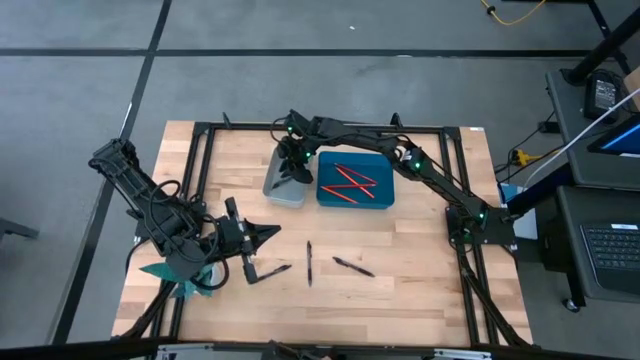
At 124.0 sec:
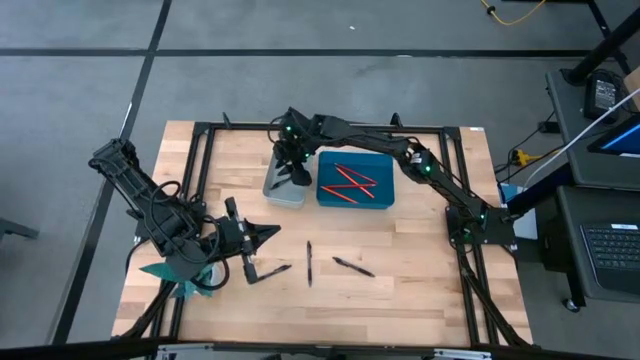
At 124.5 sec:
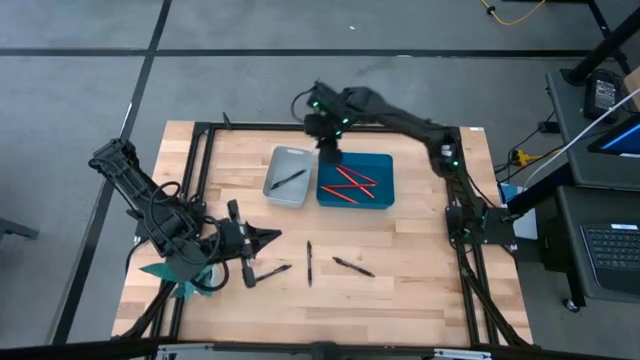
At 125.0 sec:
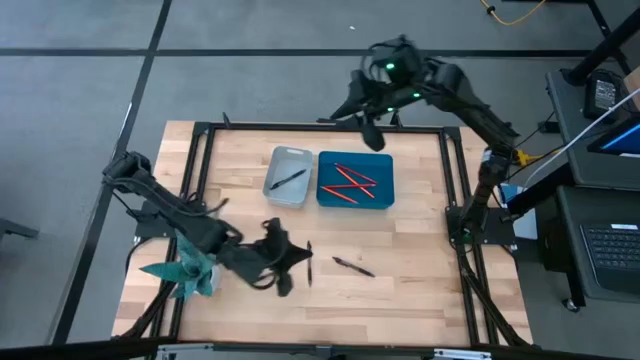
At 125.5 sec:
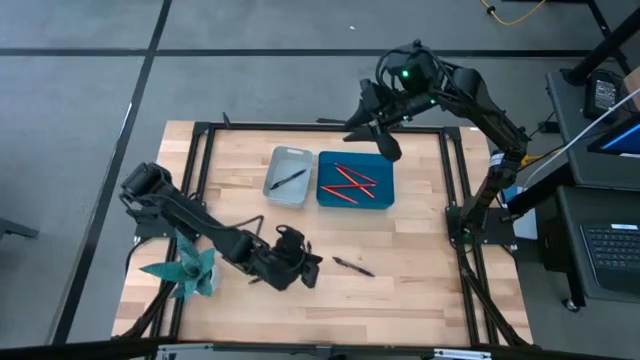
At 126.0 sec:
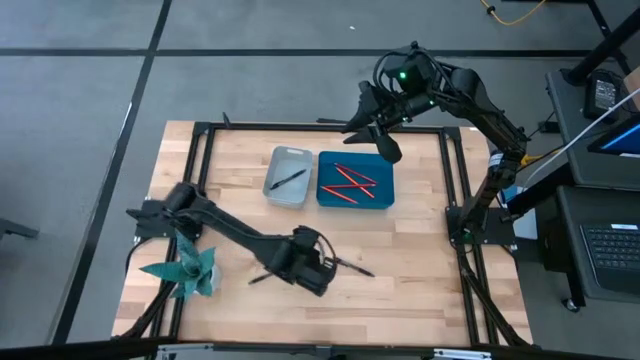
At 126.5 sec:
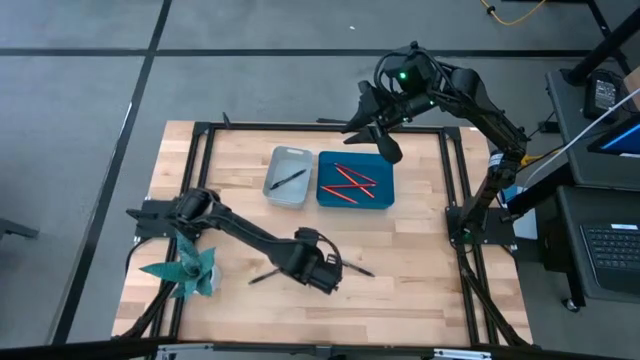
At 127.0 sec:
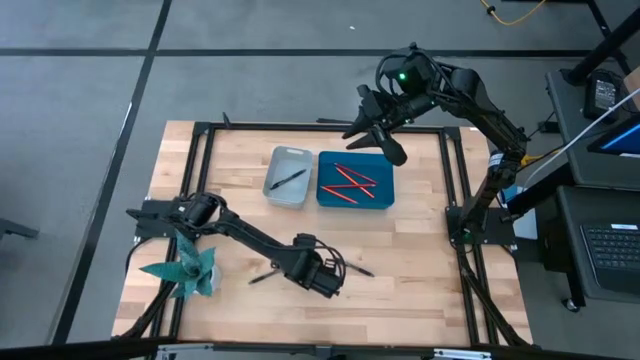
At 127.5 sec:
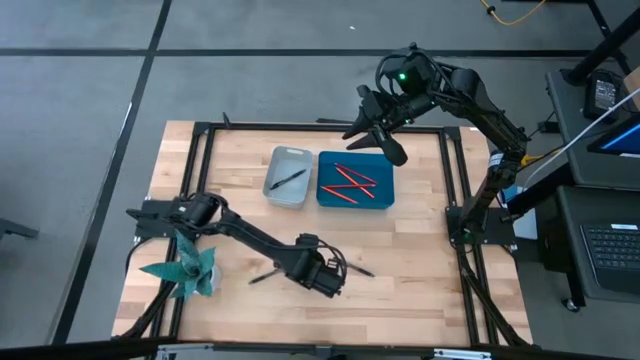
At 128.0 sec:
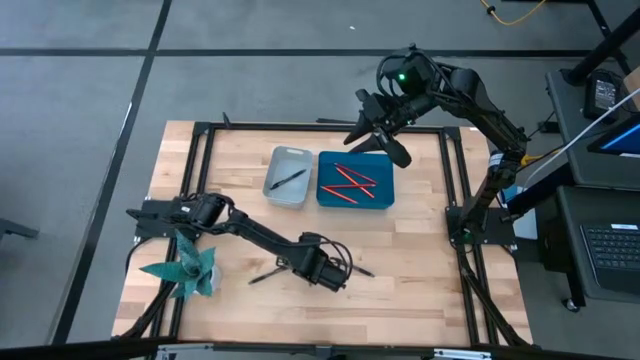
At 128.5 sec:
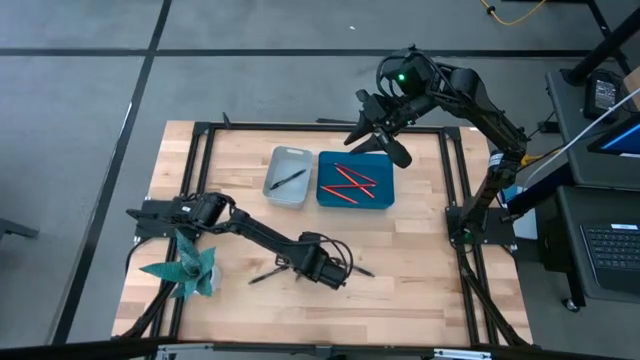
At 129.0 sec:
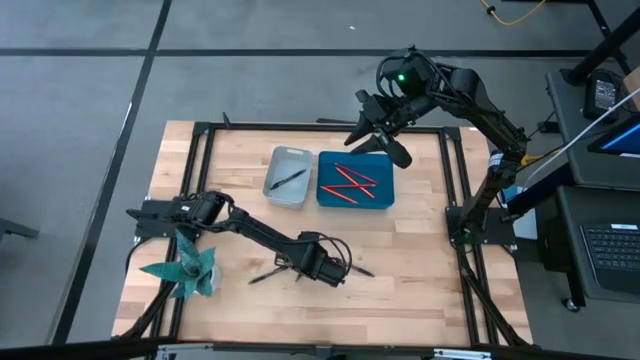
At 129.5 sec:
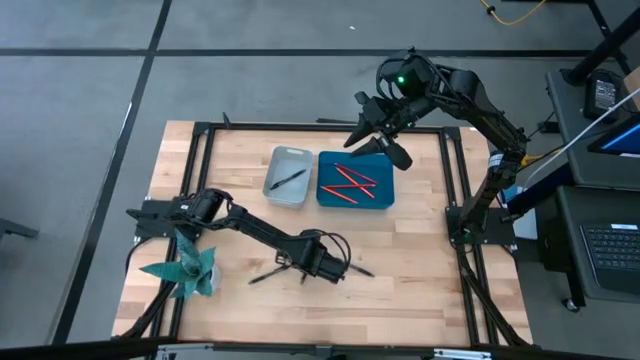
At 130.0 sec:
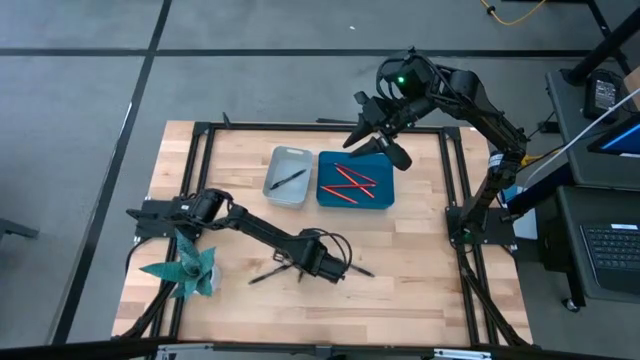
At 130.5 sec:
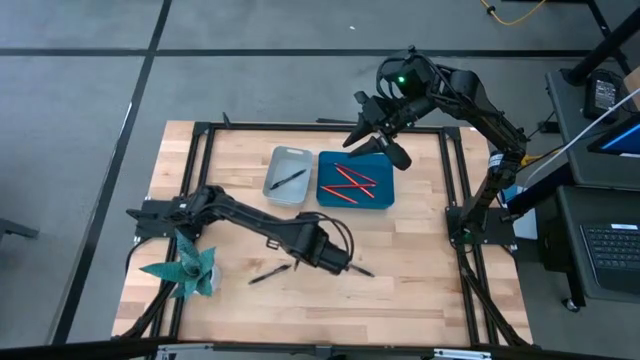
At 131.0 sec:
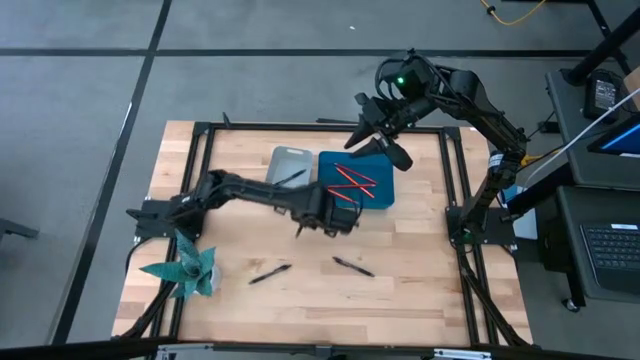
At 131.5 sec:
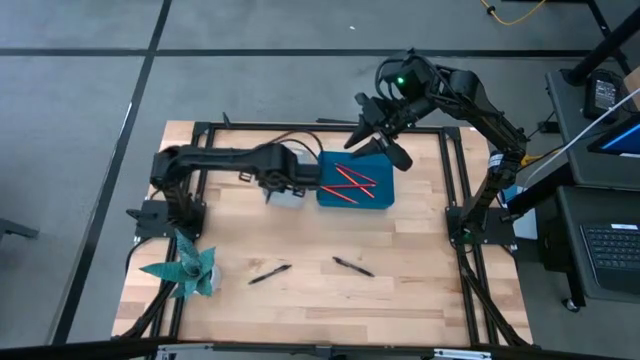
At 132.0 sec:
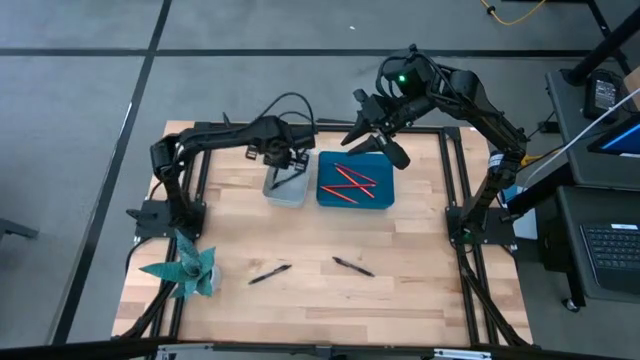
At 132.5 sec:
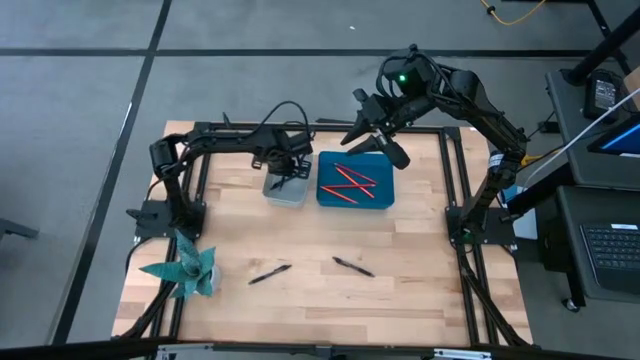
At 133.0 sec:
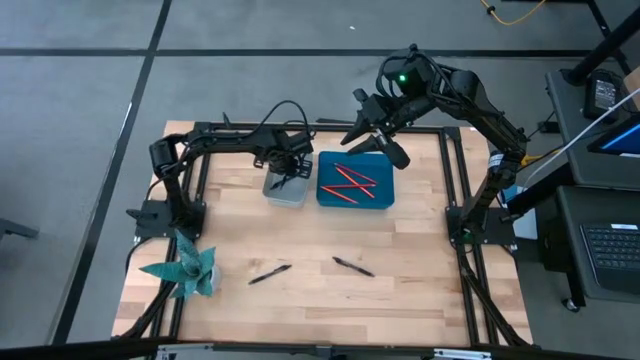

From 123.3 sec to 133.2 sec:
Task: Sort pens & pencils
Put the black pen into the gray bin

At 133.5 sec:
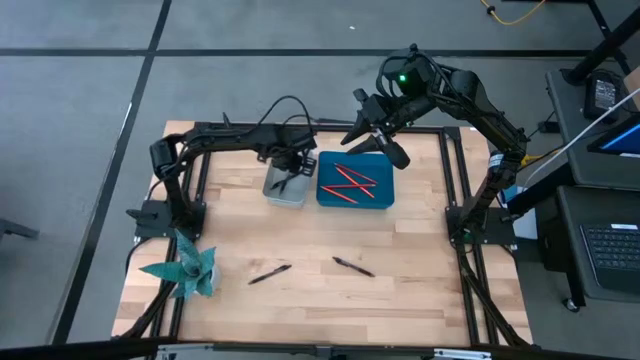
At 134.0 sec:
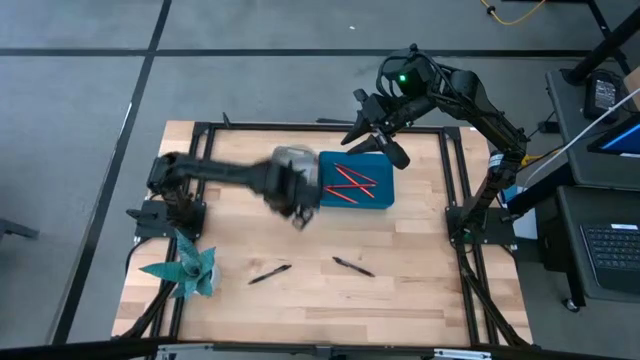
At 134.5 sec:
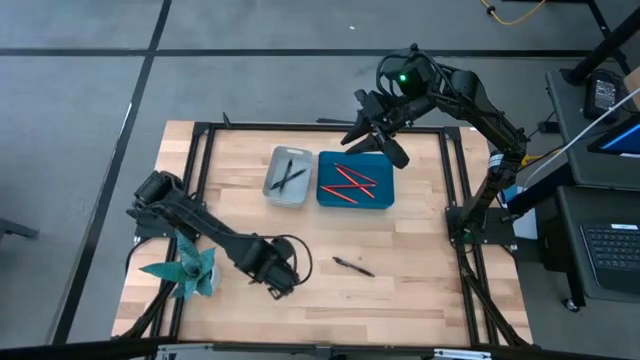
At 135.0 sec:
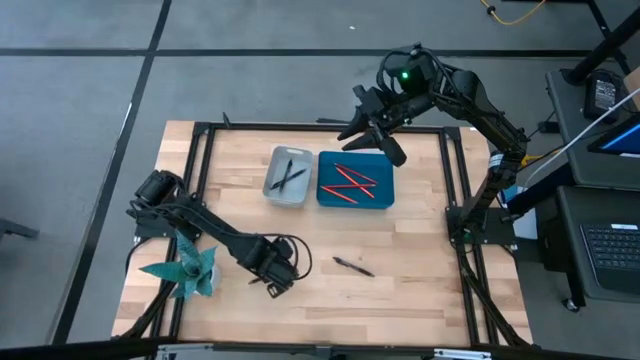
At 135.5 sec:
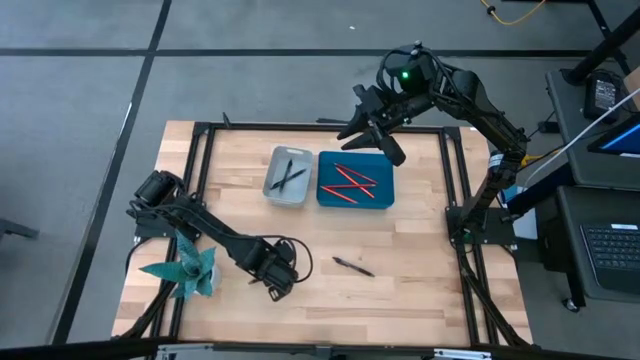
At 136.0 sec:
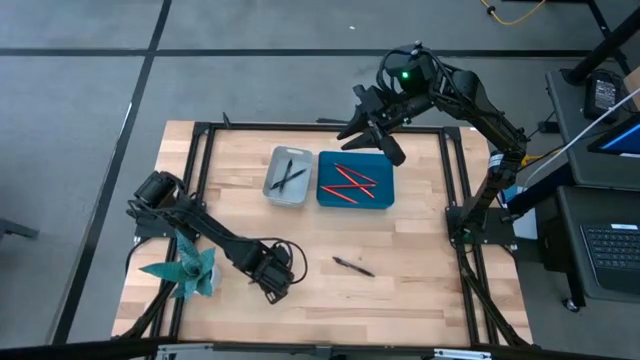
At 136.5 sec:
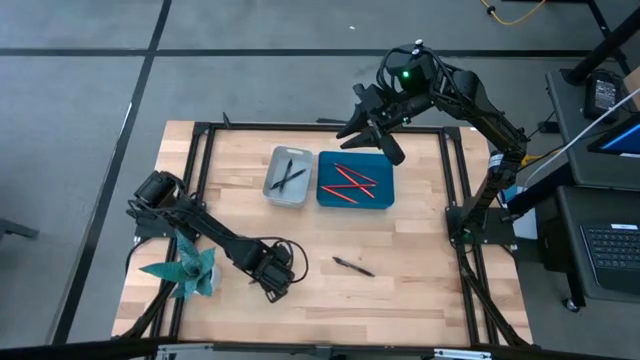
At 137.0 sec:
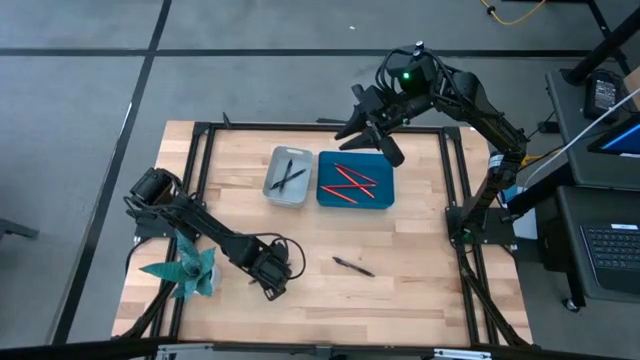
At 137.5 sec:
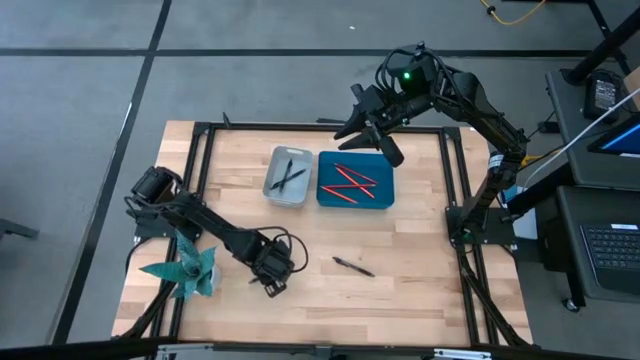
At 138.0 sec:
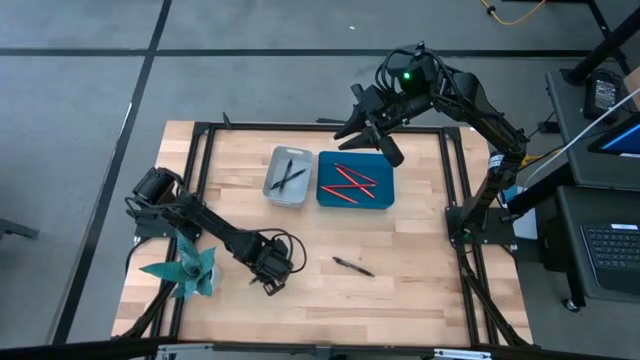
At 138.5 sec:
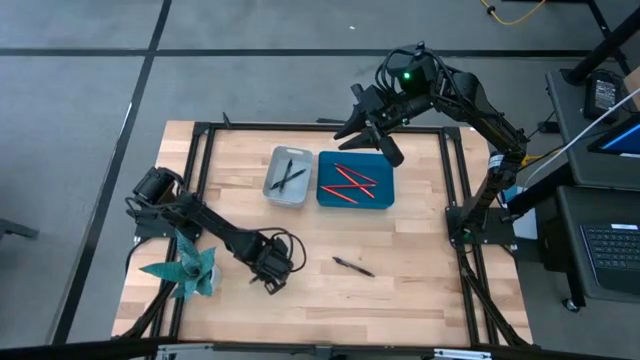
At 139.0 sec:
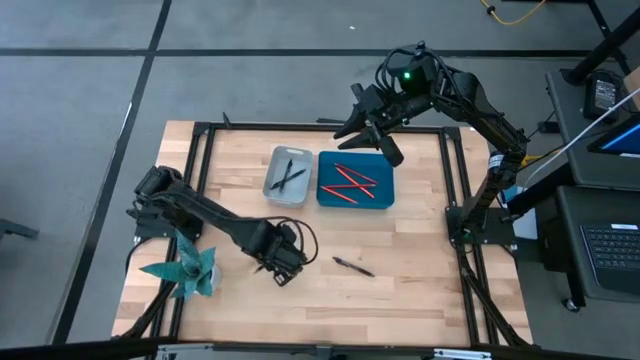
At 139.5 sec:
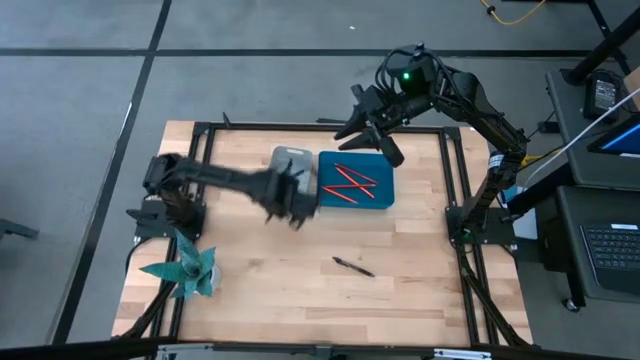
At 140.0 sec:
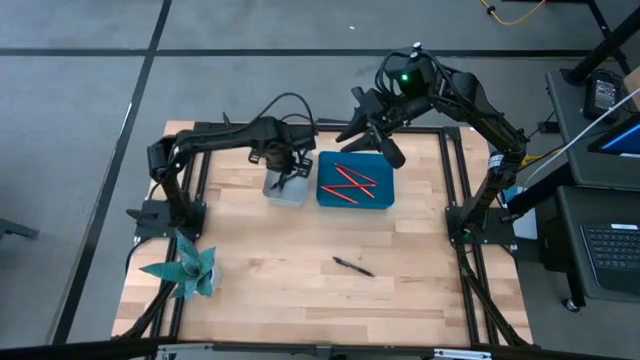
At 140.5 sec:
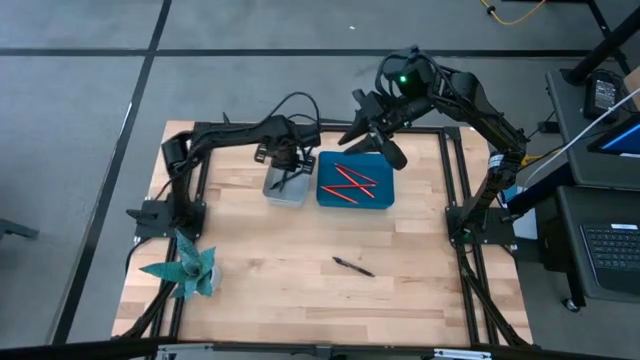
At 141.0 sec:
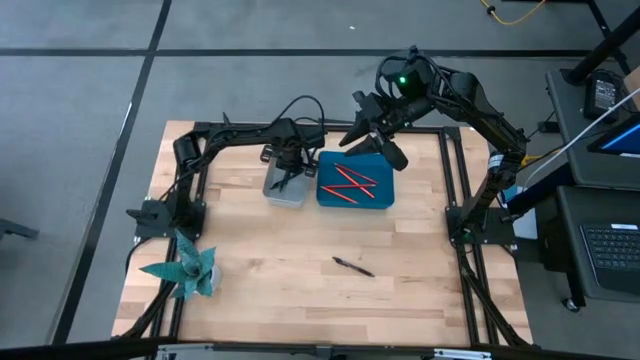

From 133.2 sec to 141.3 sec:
Put the black pen into the gray bin

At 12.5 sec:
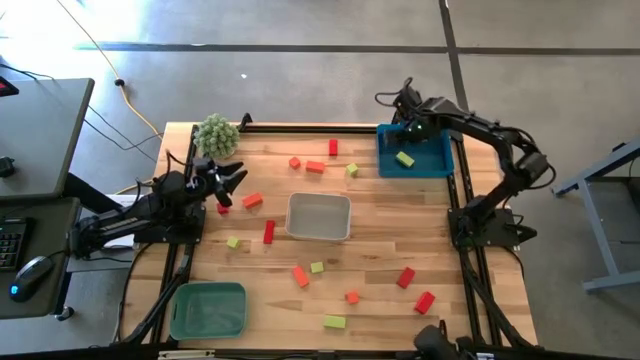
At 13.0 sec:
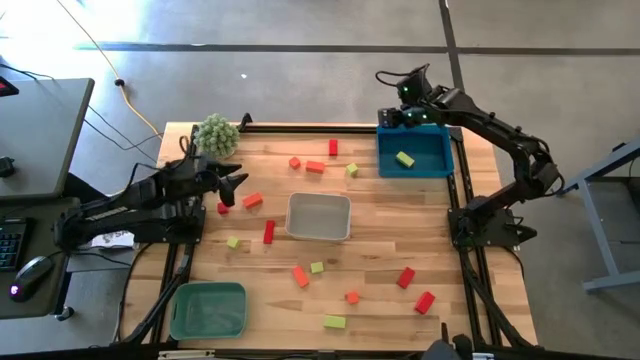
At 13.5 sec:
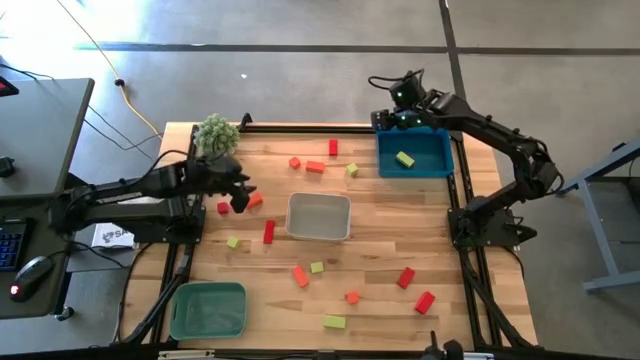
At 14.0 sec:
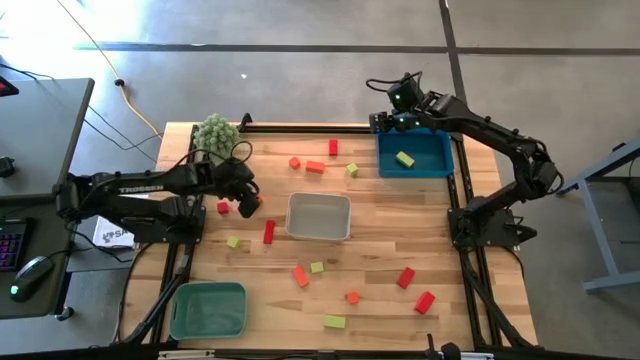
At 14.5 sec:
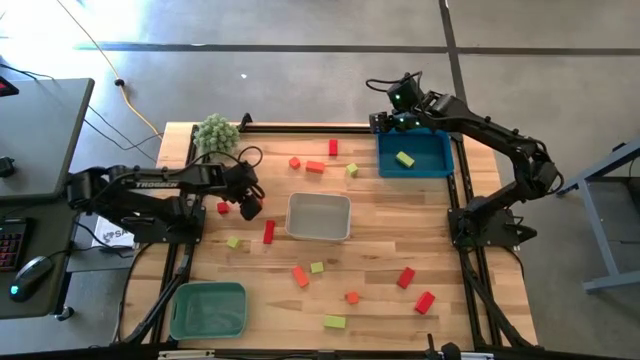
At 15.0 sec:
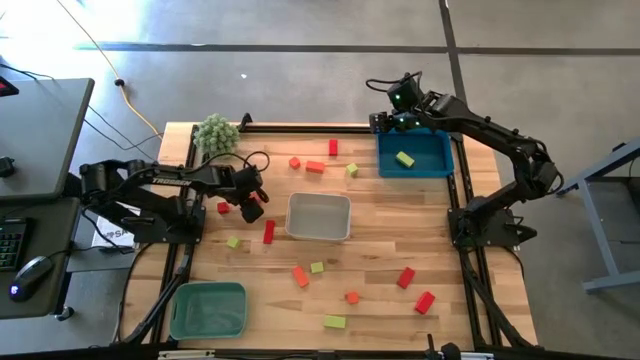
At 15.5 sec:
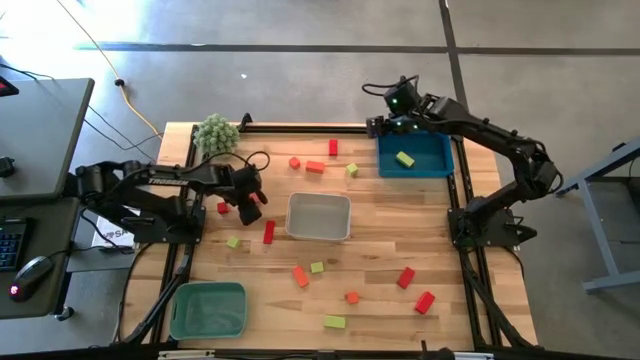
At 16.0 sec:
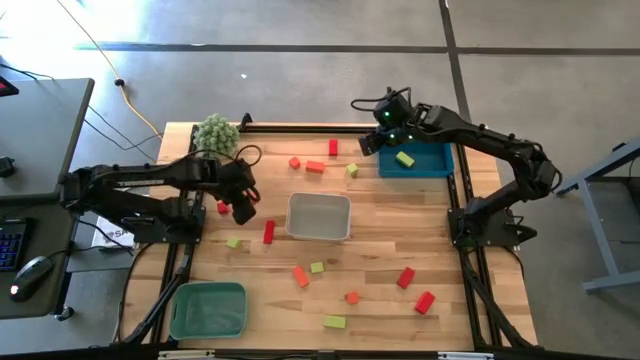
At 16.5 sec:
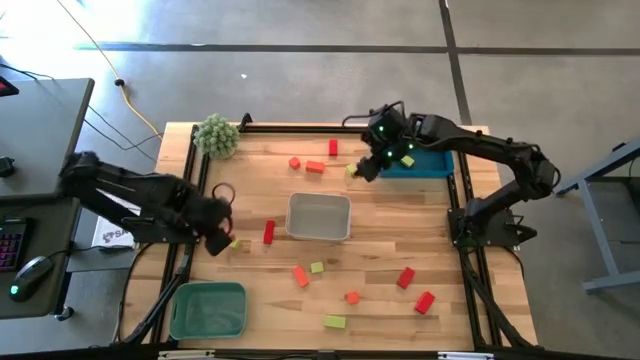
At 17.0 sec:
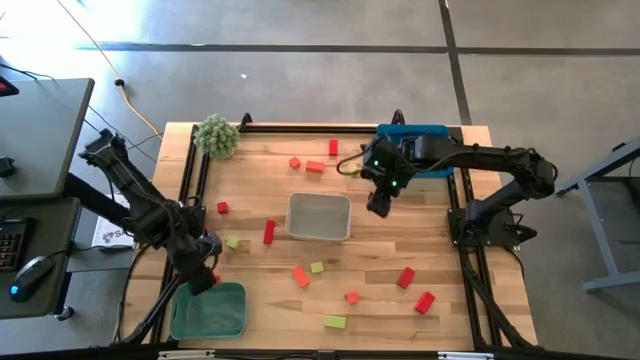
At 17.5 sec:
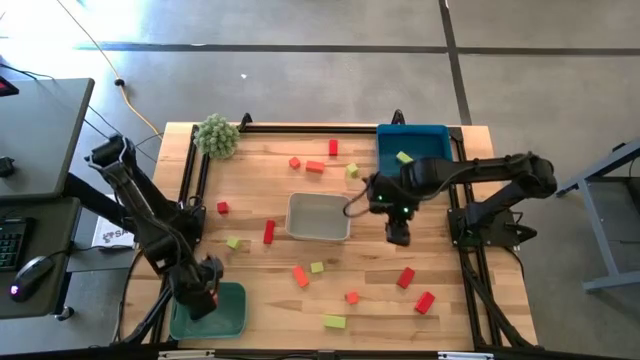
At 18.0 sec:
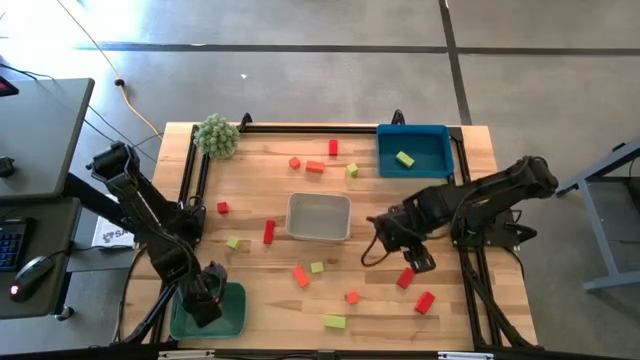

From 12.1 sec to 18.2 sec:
Task: Sort & place blocks by color
Put the orange wooden block into the green bin
